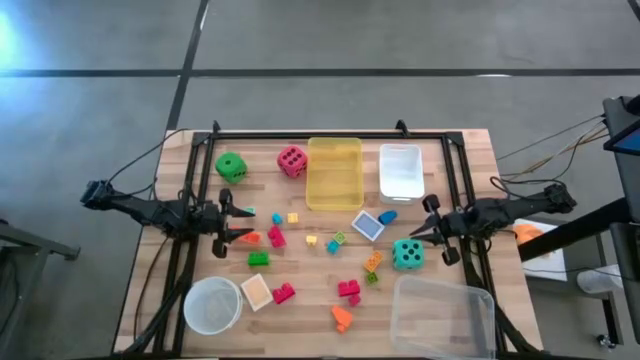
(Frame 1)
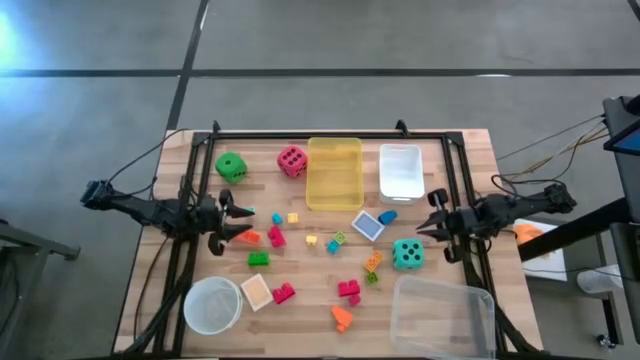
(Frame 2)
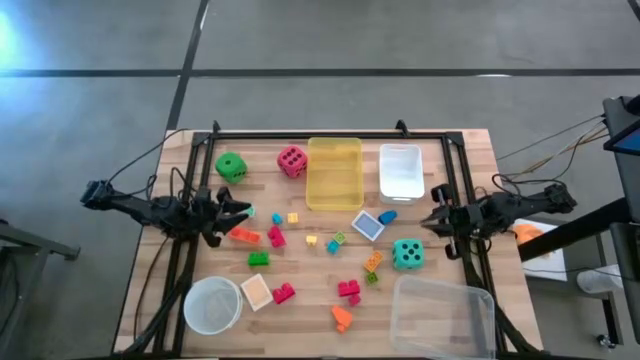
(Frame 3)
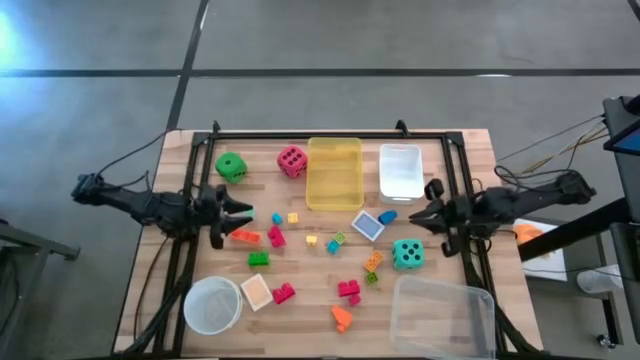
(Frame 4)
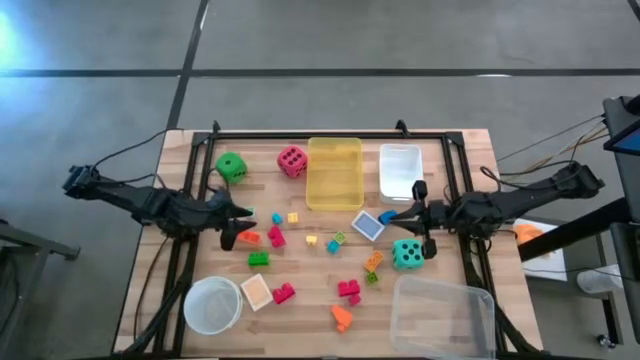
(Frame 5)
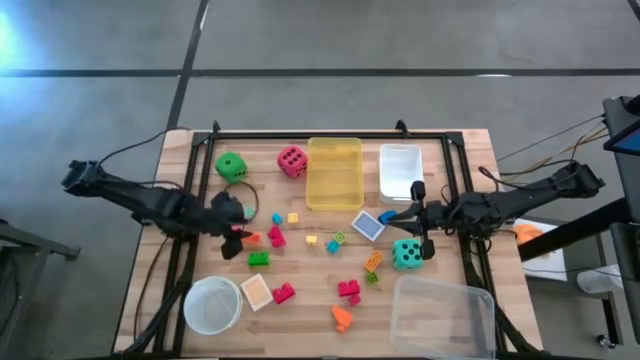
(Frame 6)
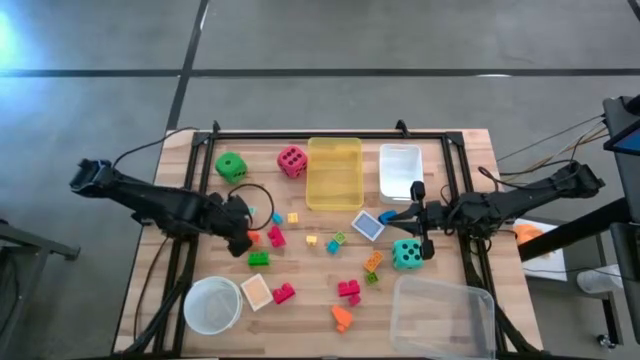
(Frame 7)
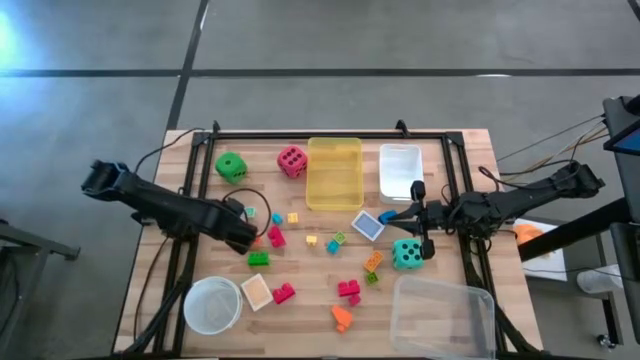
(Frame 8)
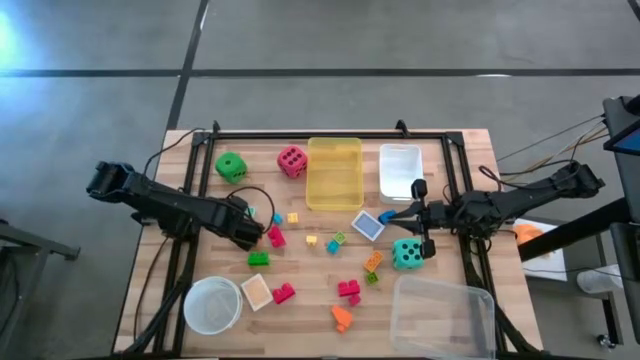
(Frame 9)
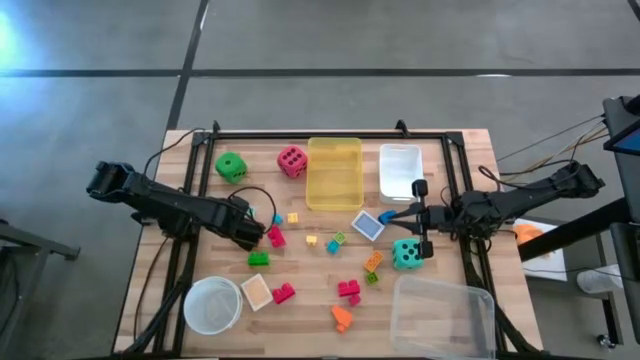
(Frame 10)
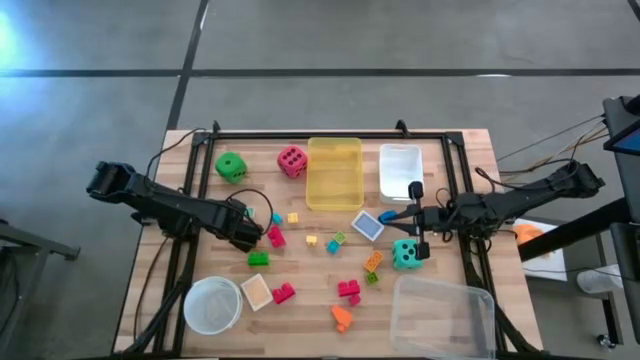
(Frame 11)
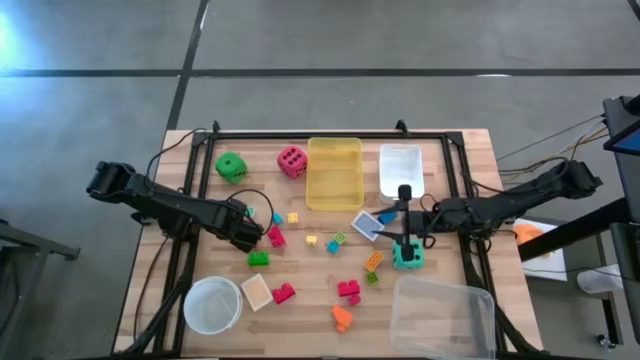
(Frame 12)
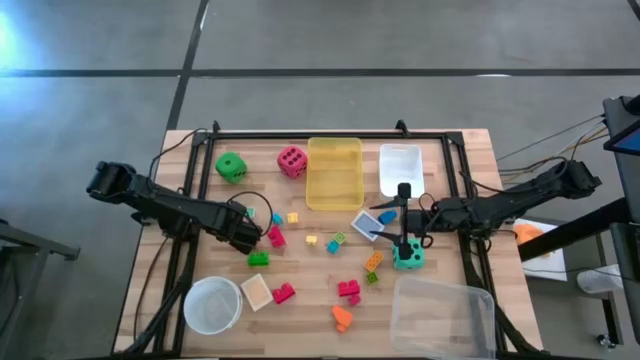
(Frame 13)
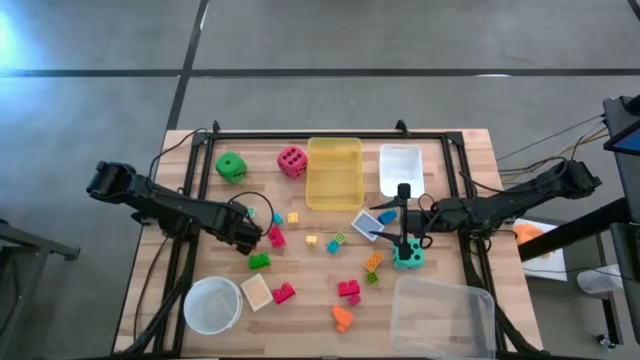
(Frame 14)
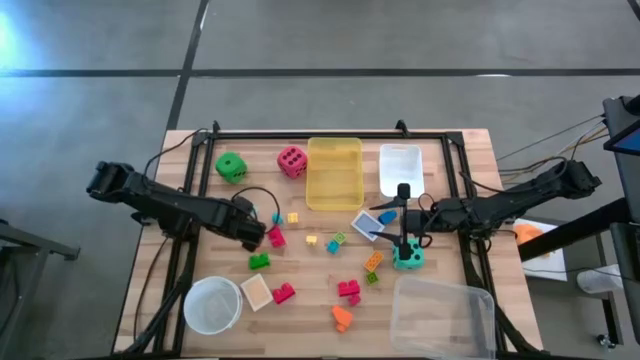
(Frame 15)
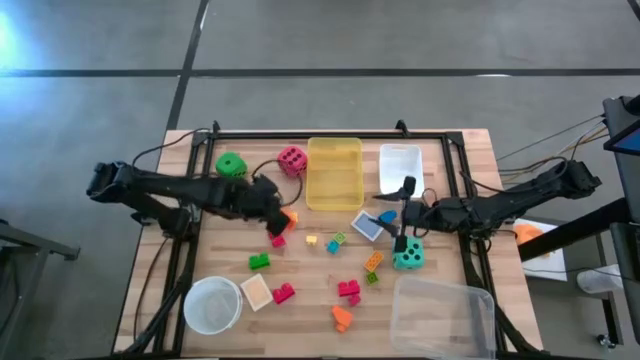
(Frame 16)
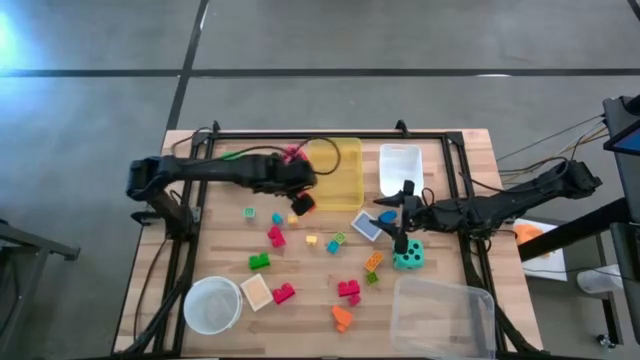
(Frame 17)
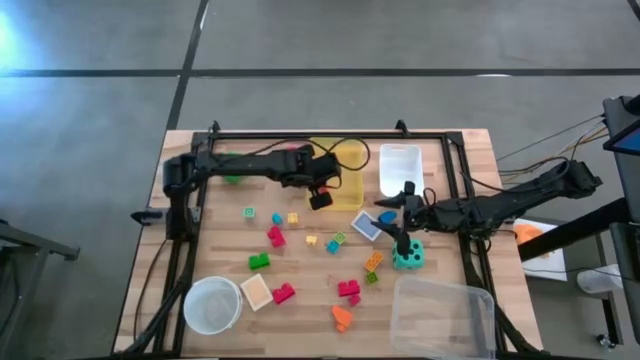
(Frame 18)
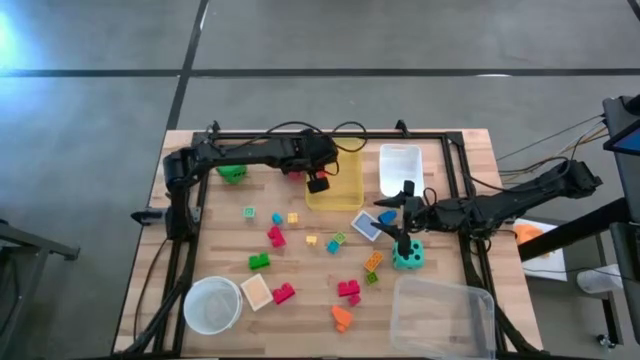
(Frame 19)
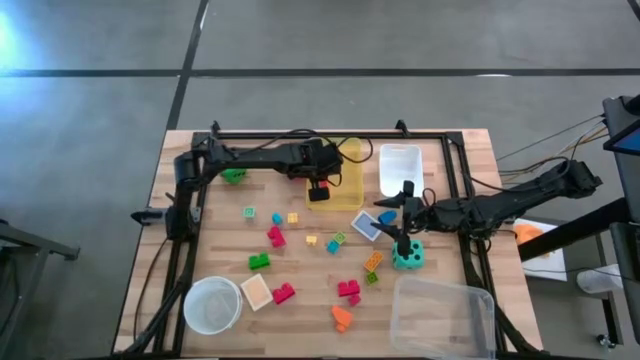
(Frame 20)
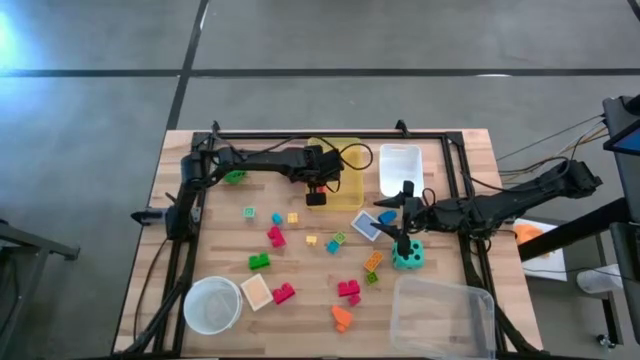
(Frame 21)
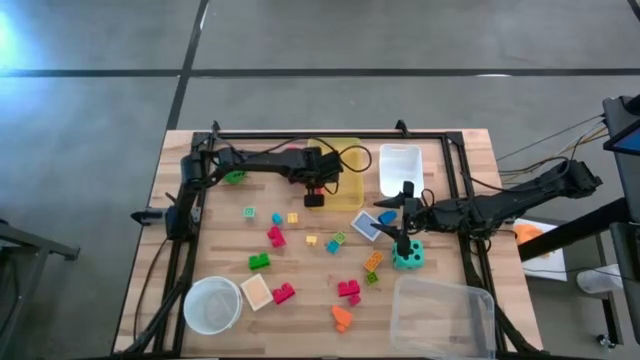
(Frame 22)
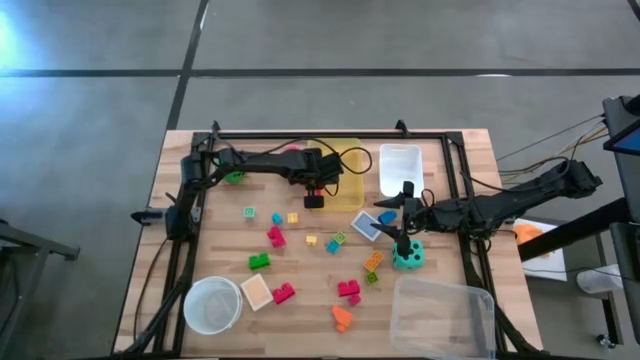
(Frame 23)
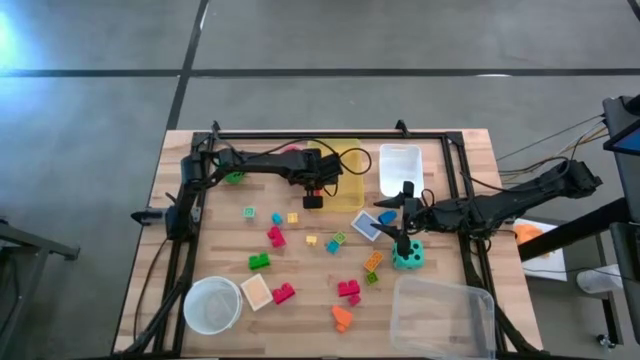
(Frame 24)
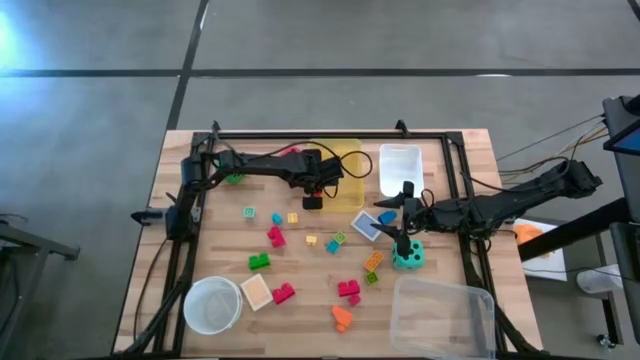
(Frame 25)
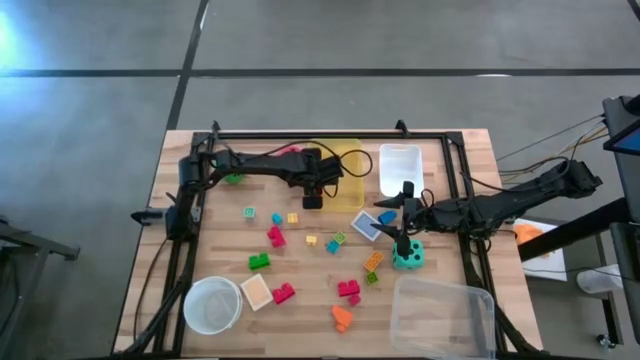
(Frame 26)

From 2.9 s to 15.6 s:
Task: Pick & Place Toys
Put the orange game piece into the yellow bin

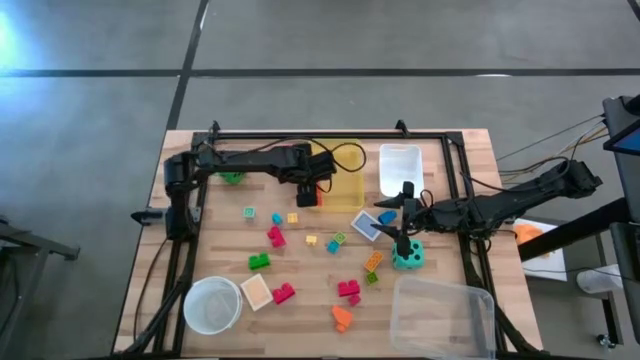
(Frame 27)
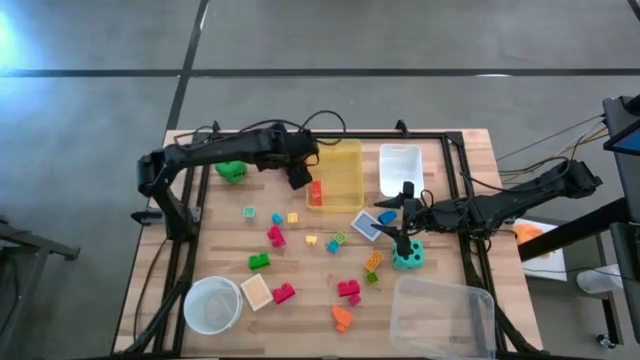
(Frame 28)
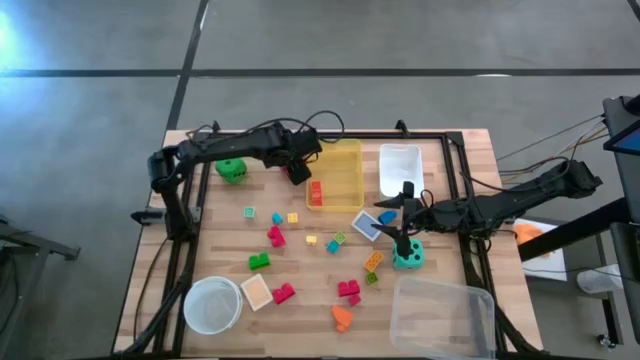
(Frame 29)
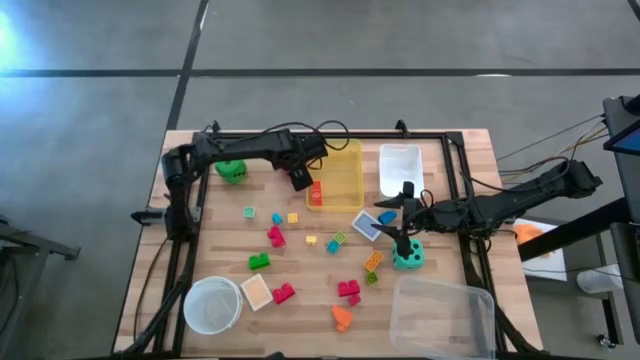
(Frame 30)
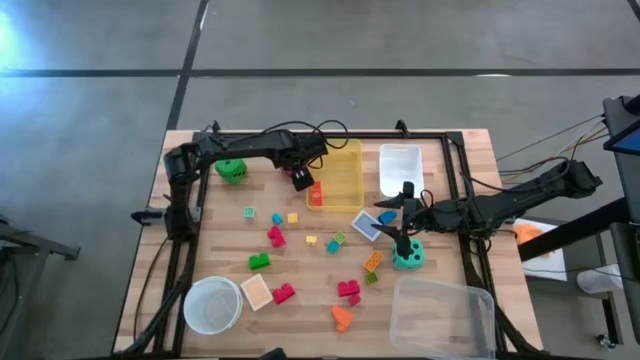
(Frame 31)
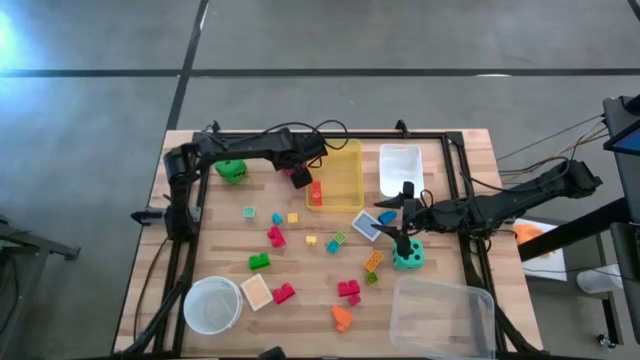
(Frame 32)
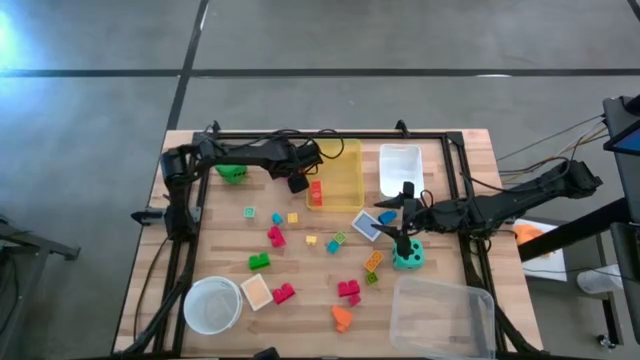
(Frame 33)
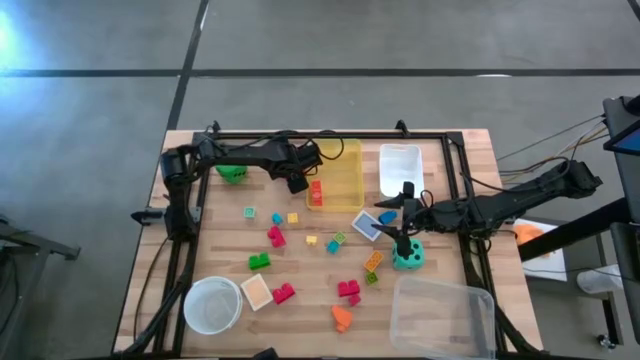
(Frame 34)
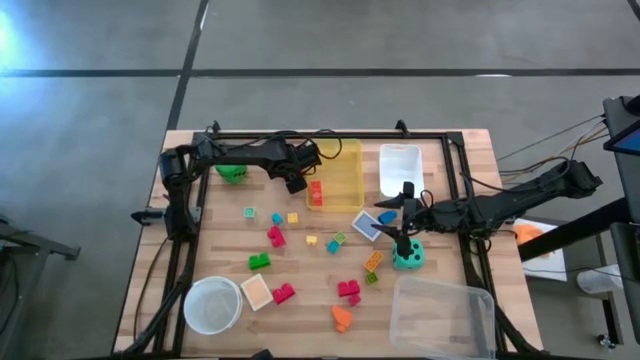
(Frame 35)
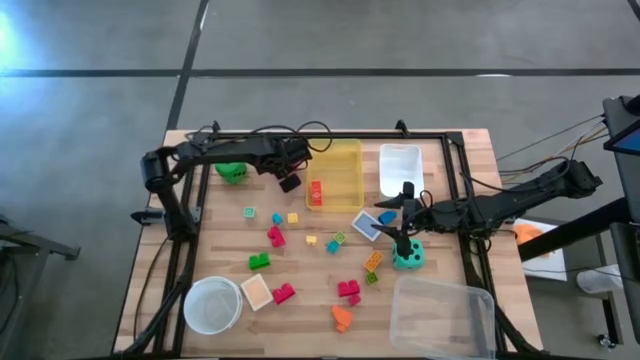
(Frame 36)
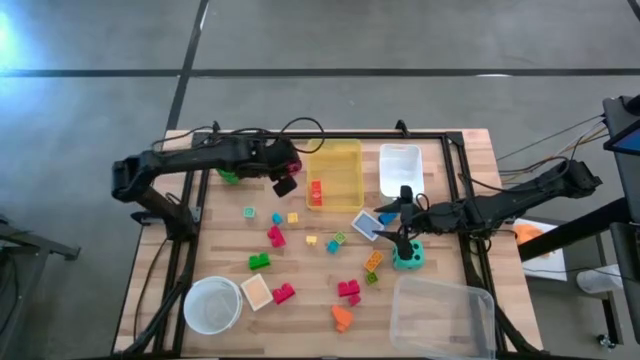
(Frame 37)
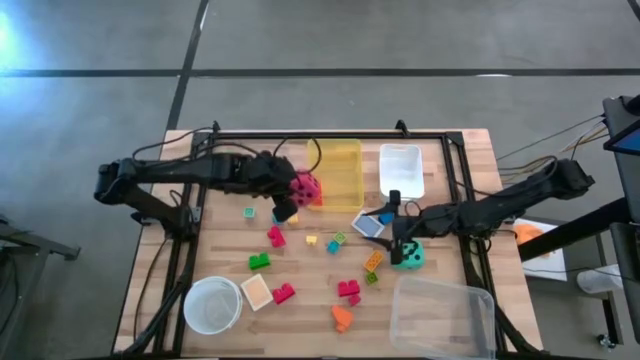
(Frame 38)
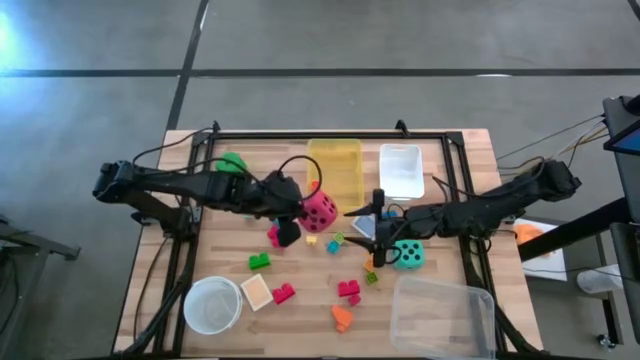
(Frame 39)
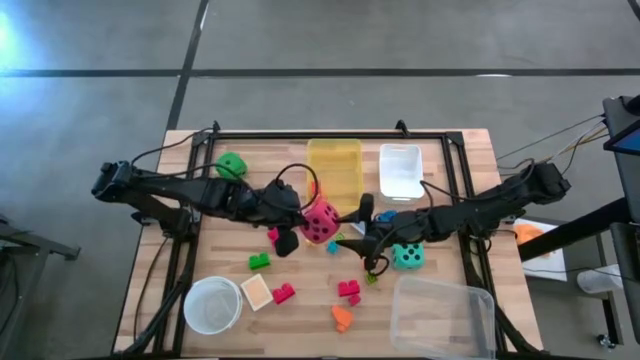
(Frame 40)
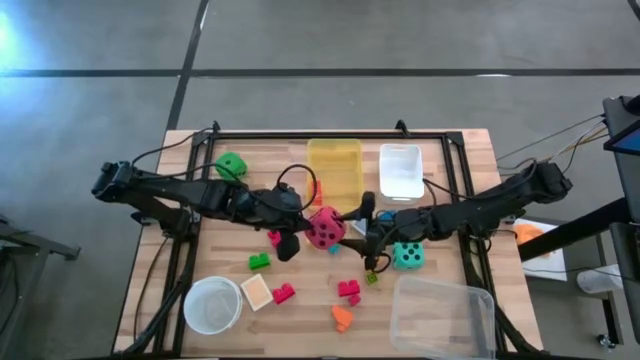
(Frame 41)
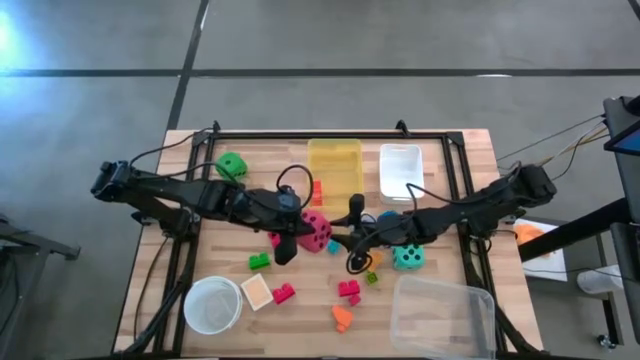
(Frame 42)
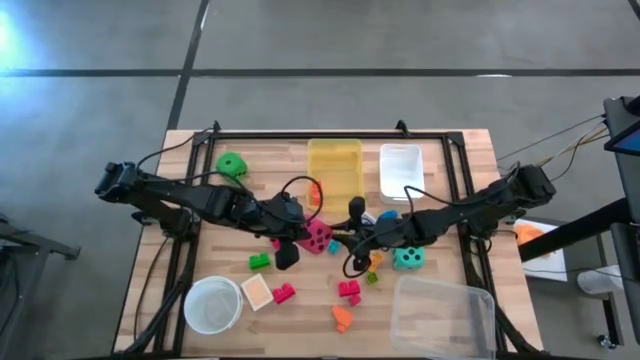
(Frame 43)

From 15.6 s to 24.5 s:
Put the red dice into the transparent bin
